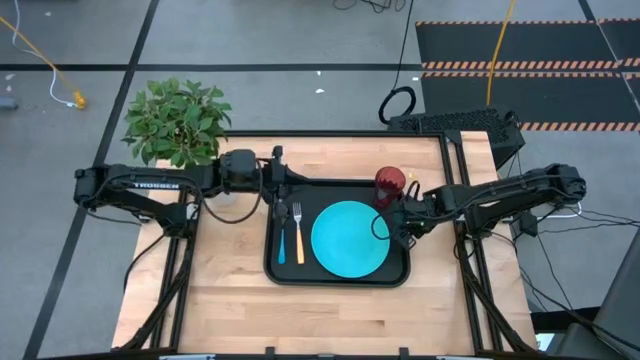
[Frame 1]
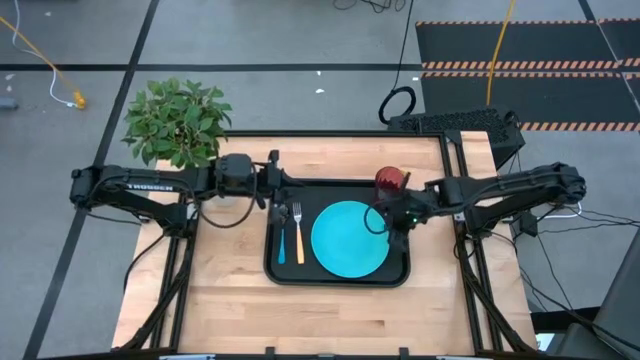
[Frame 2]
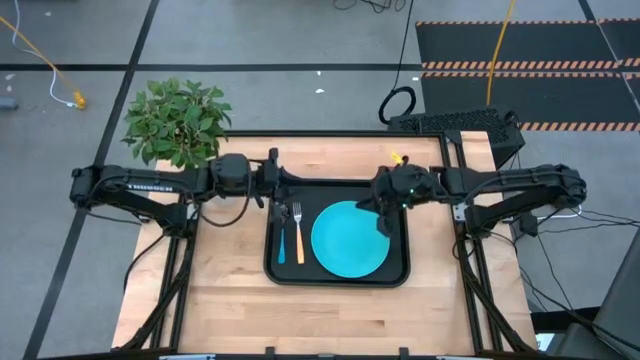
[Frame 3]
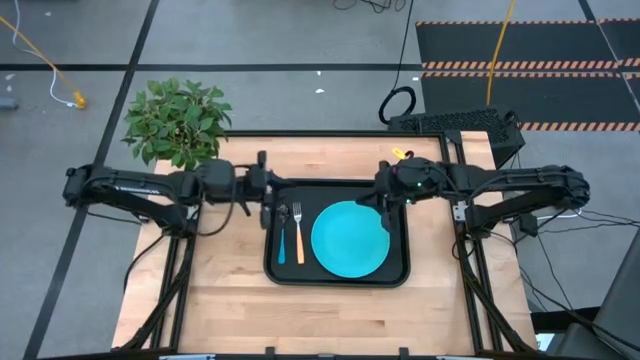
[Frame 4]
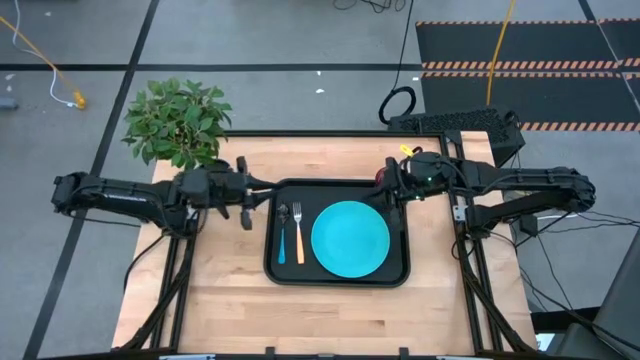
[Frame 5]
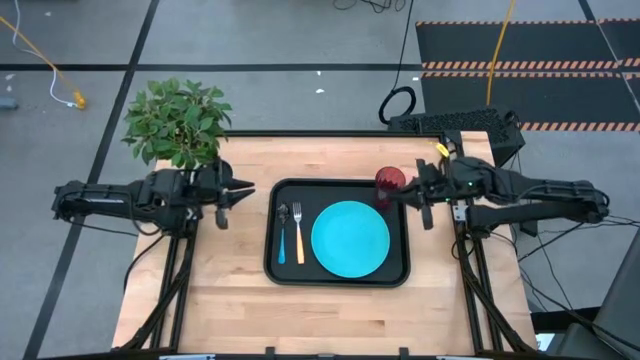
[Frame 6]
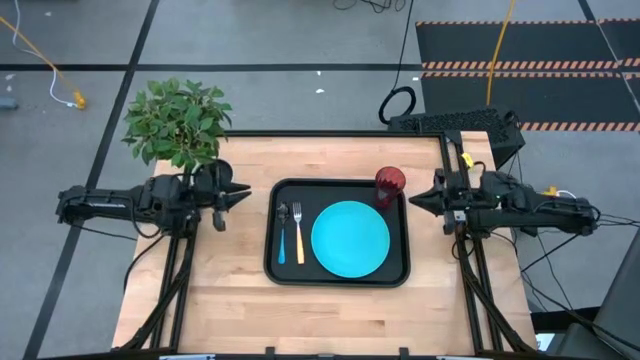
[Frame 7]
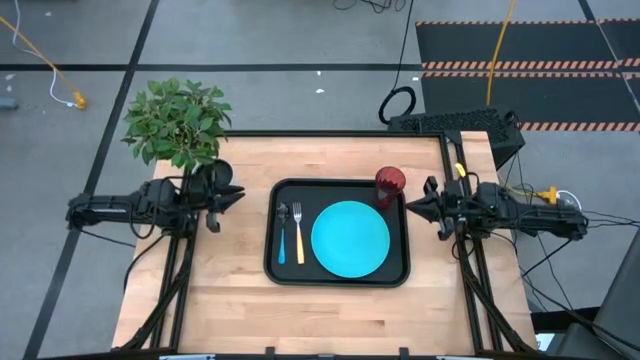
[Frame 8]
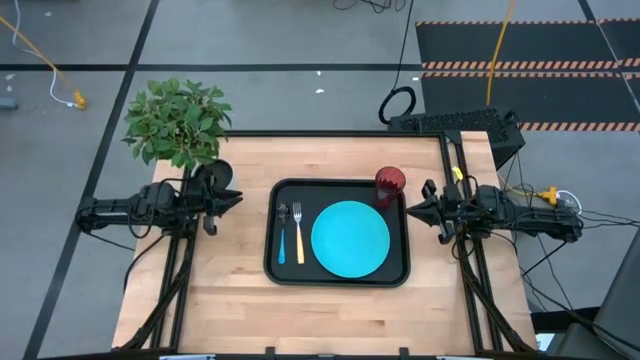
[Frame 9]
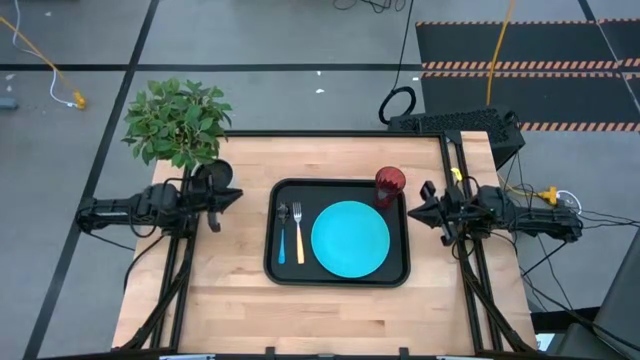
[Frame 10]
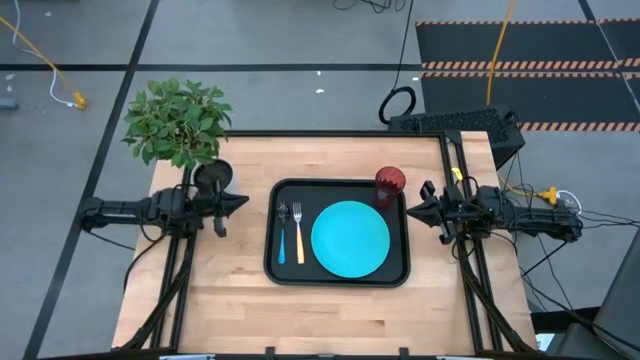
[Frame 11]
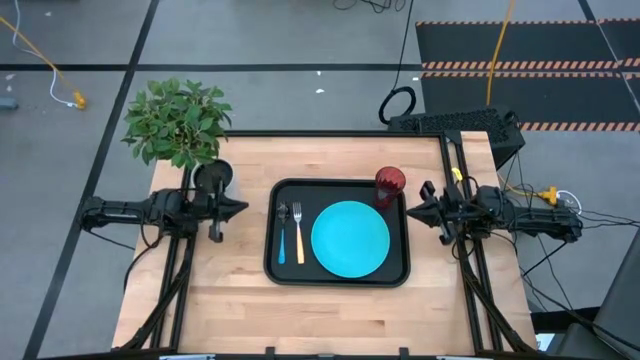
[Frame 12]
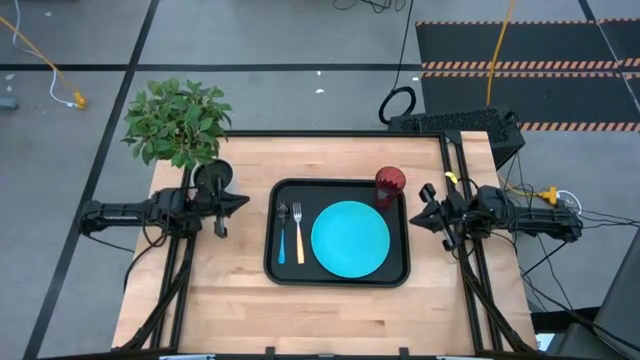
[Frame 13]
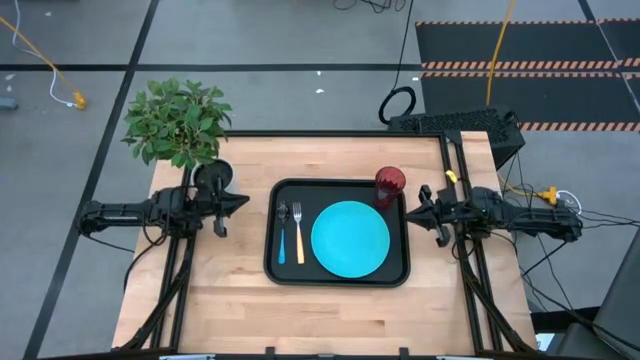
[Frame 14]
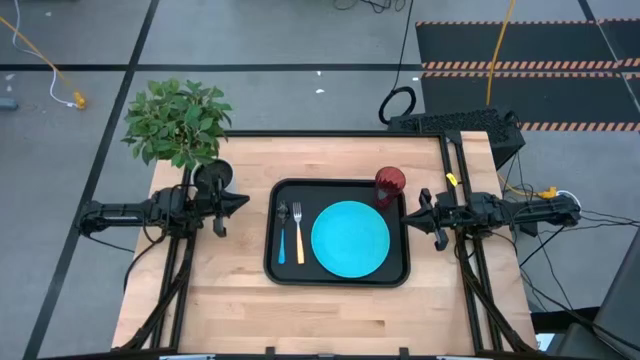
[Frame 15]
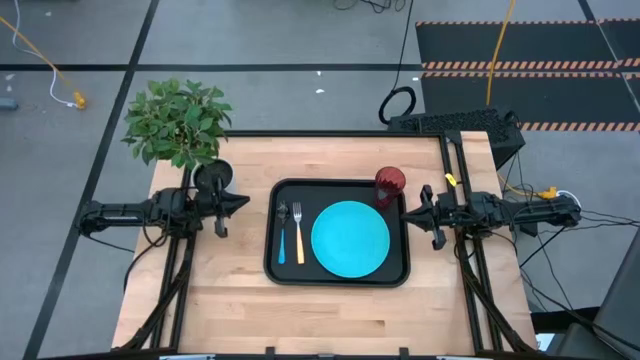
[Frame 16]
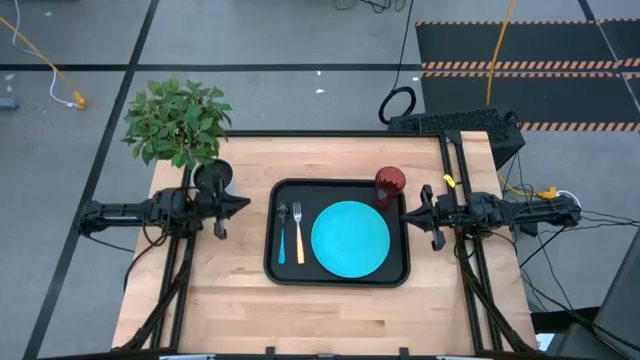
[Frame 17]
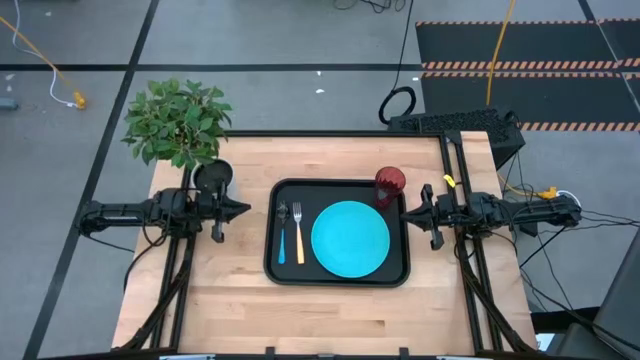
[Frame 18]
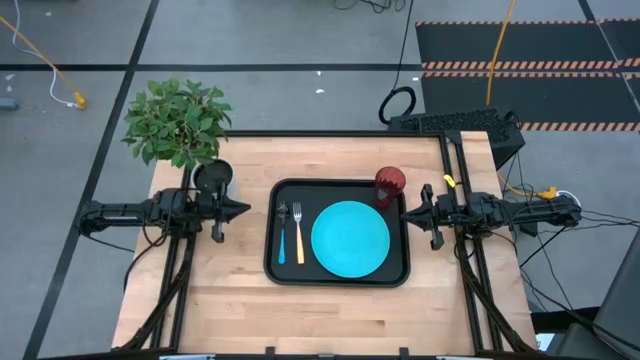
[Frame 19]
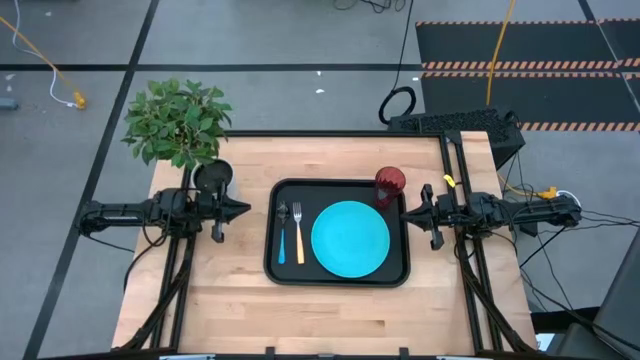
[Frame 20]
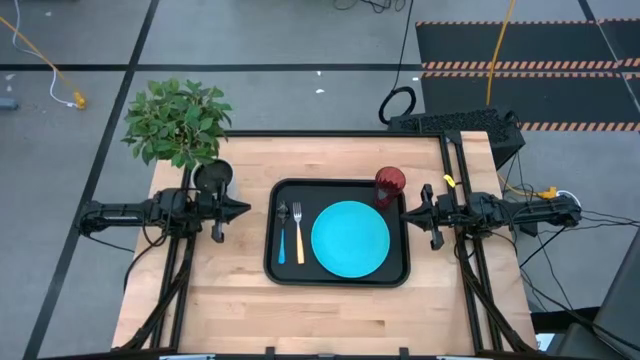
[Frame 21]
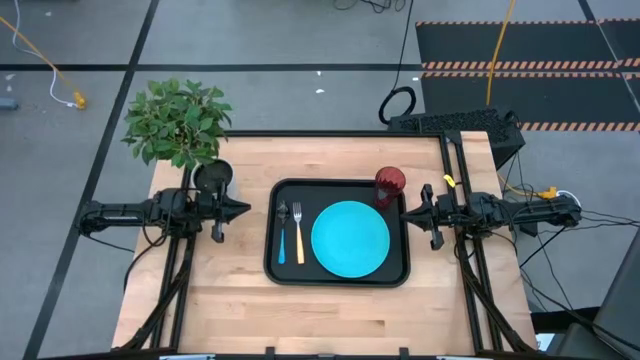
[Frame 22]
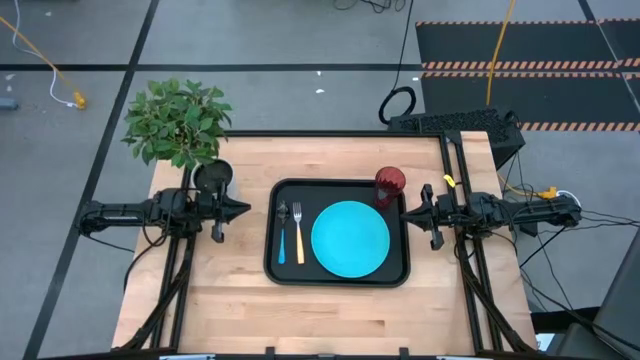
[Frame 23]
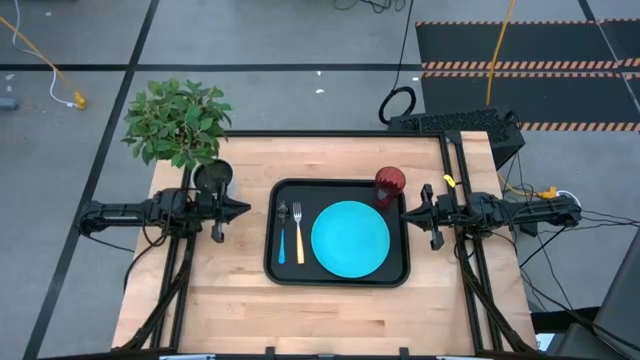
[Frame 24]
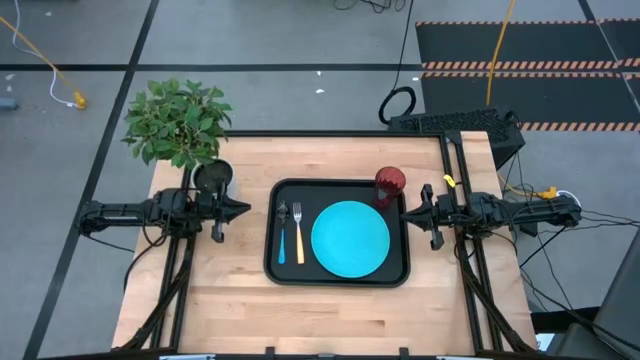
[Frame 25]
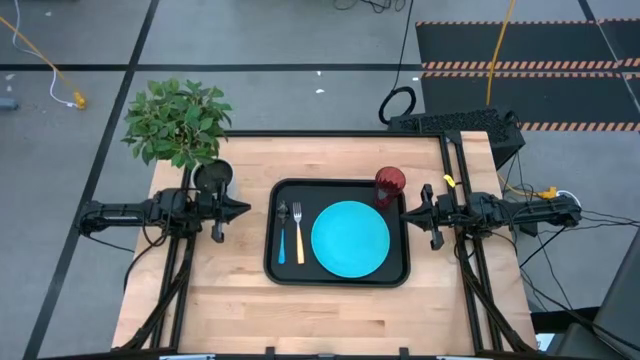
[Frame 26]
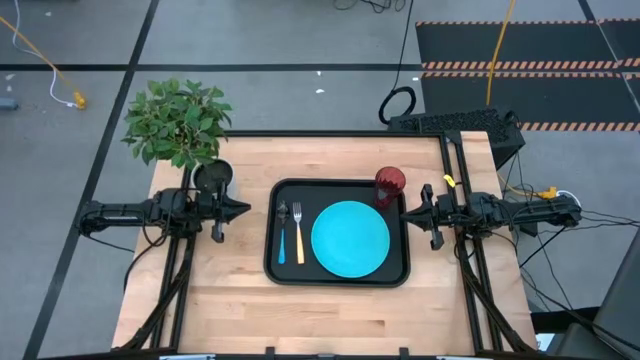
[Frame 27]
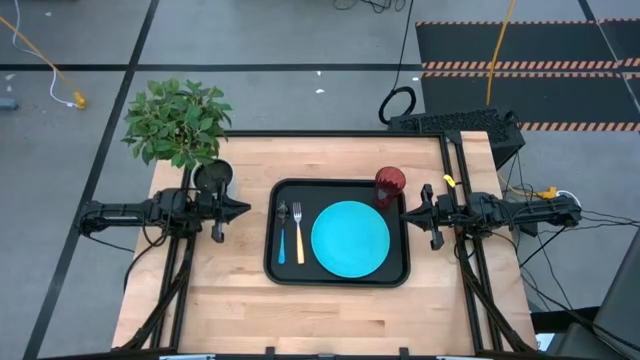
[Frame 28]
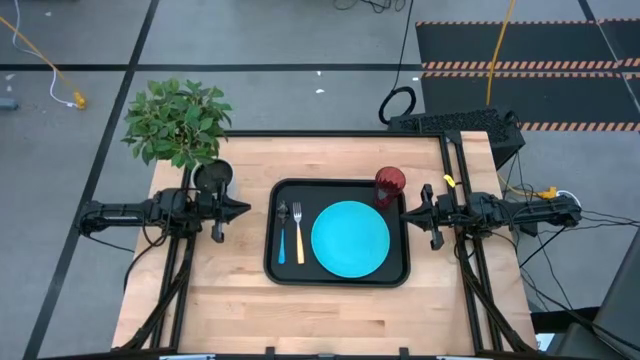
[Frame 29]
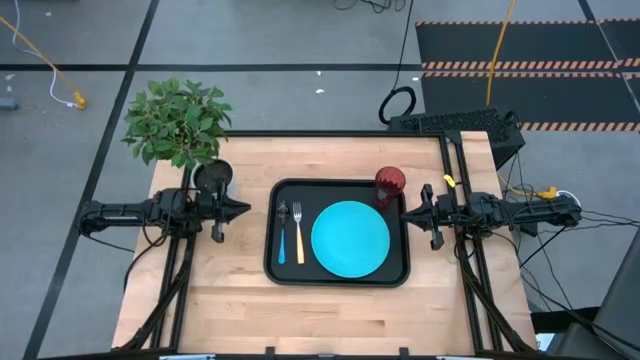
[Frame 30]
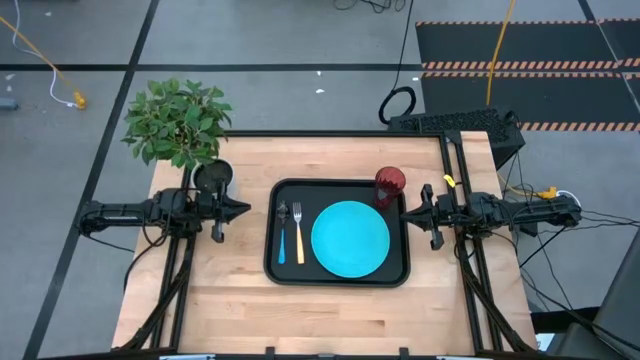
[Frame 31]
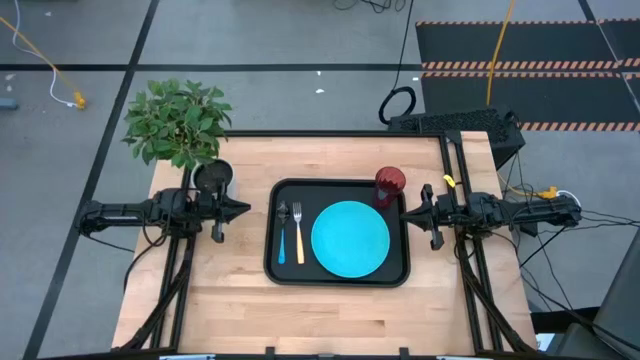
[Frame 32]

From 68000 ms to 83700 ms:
Task: Pick and place plate/cup/fork/spoon on tray
Return to Home Position

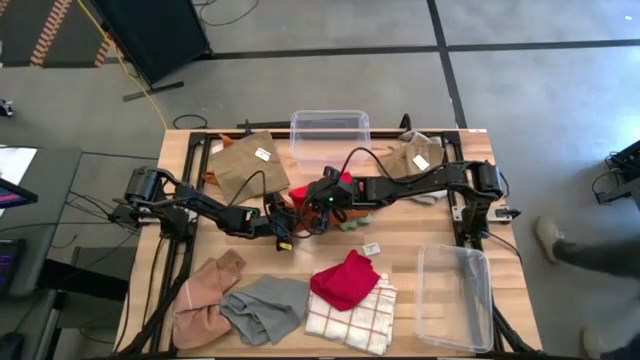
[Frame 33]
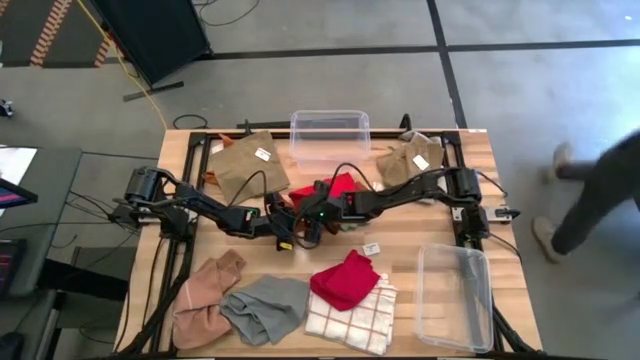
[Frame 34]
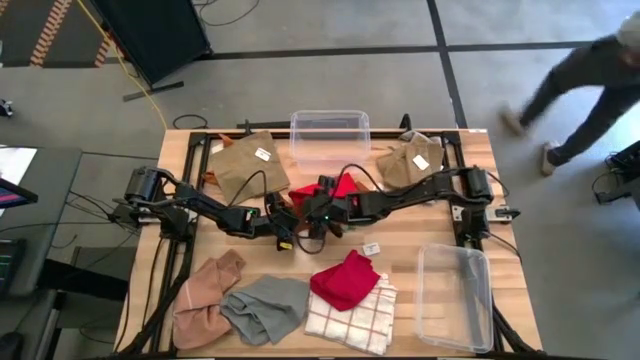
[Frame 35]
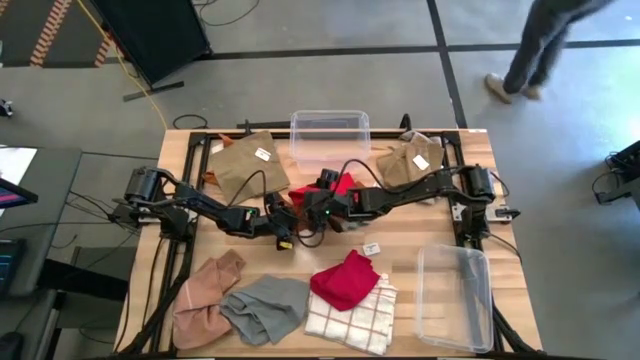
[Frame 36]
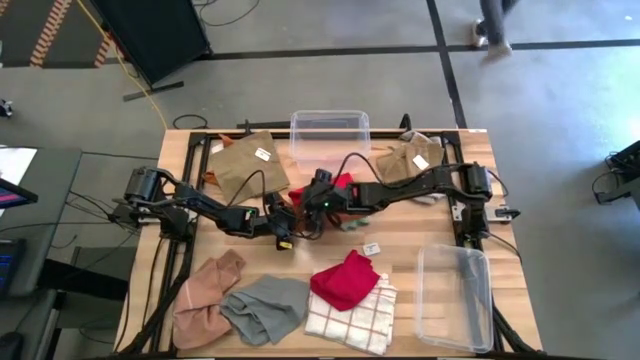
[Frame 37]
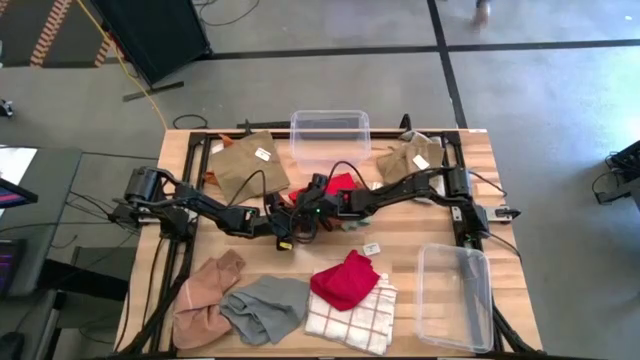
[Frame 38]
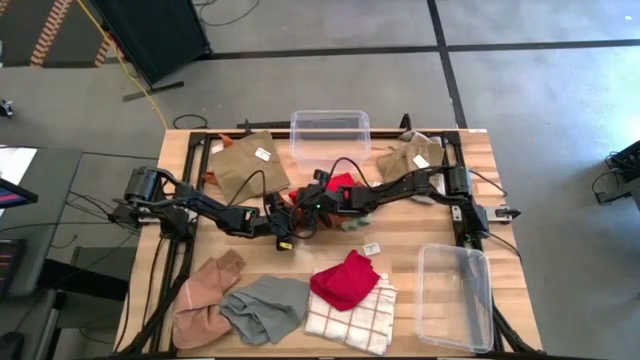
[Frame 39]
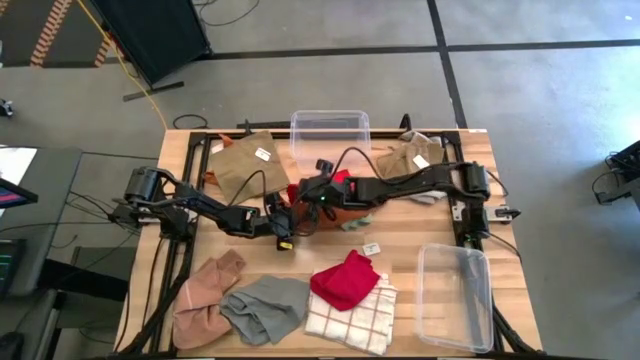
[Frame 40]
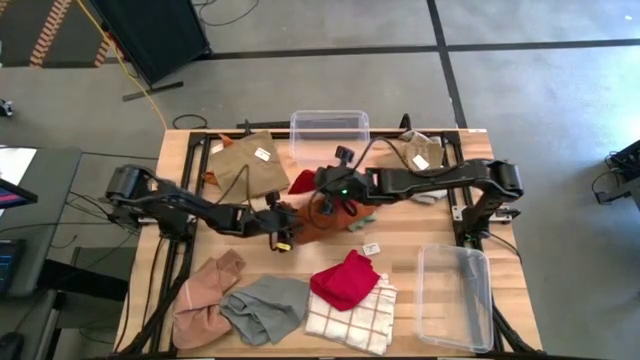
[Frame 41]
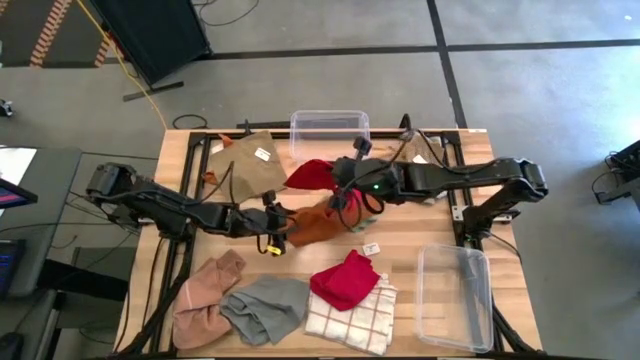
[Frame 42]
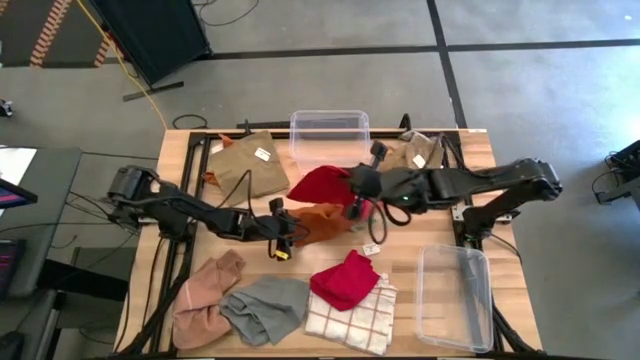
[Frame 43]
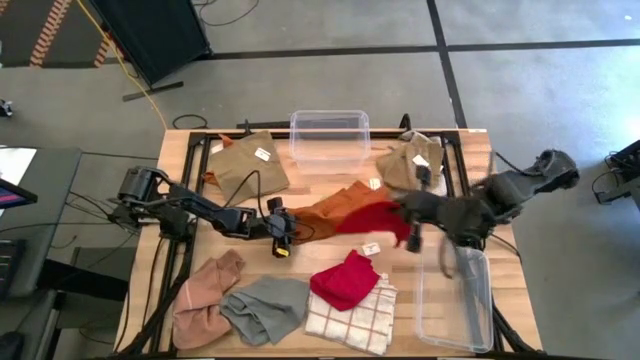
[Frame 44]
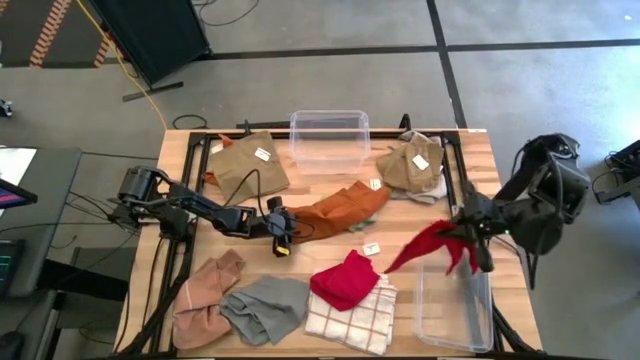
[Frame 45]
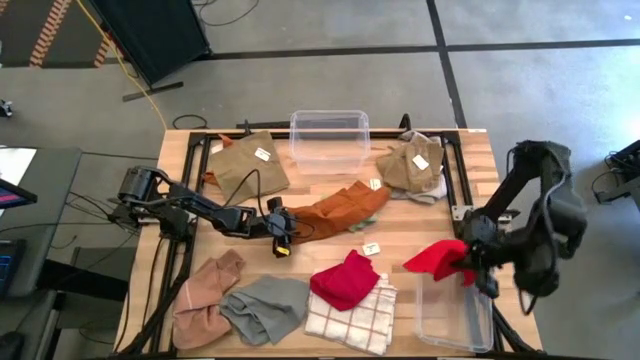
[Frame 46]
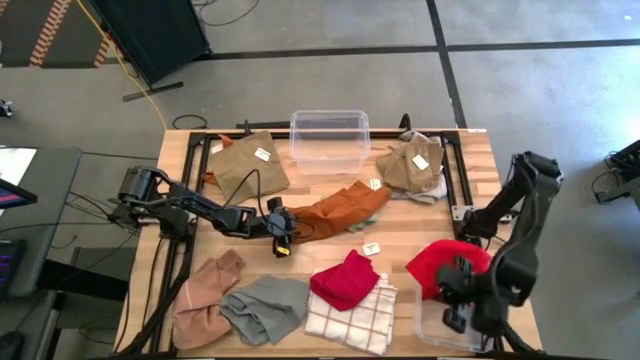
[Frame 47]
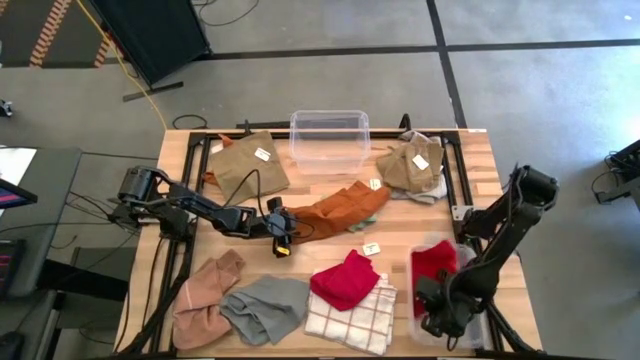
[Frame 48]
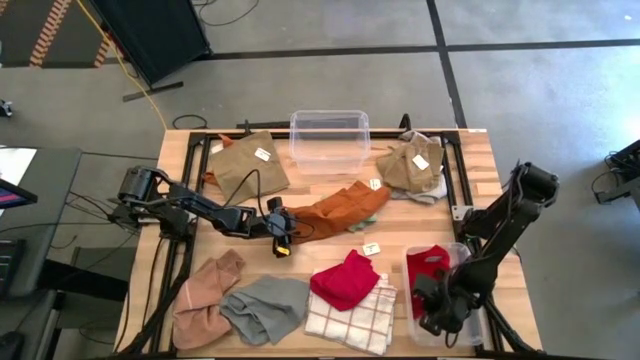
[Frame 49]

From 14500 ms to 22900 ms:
Task: Sort towels by color in basket
Put the top red towel into the bottom transparent bin
